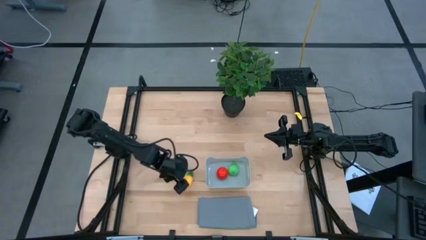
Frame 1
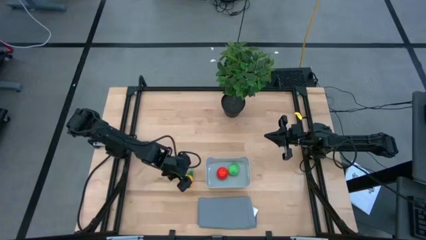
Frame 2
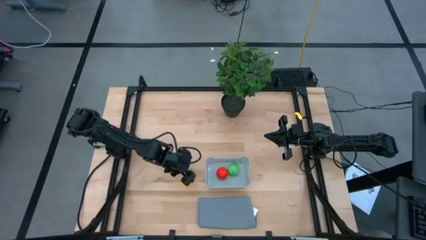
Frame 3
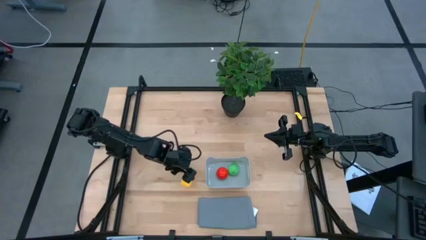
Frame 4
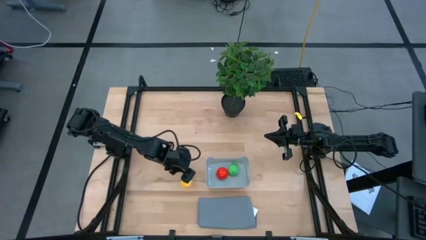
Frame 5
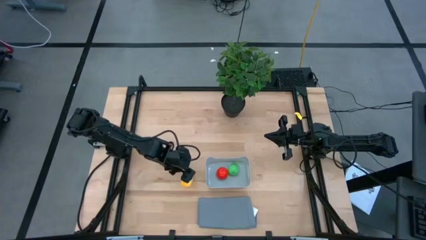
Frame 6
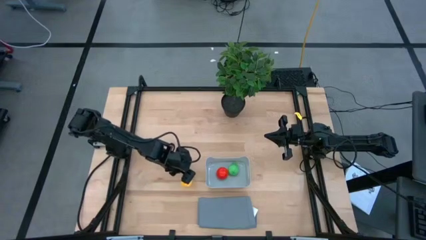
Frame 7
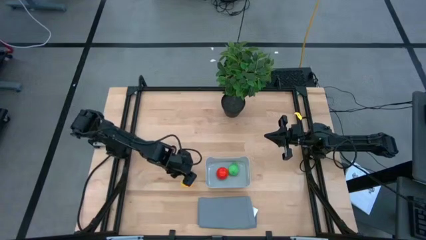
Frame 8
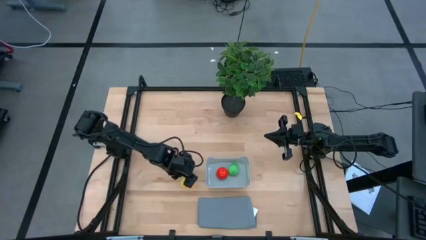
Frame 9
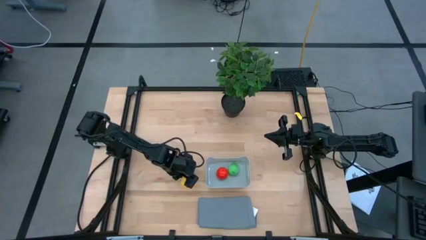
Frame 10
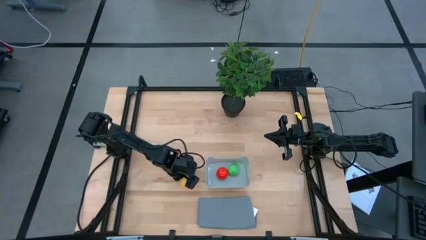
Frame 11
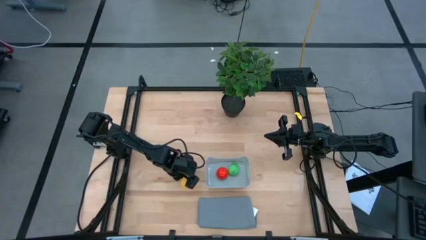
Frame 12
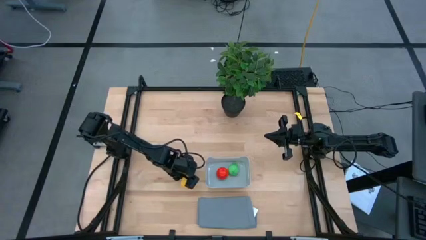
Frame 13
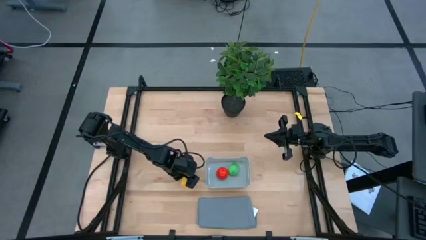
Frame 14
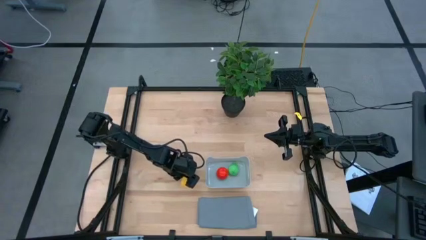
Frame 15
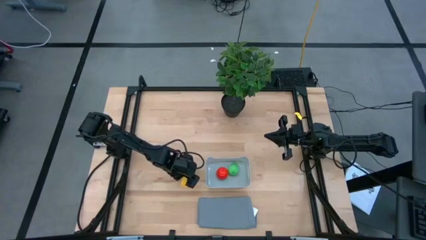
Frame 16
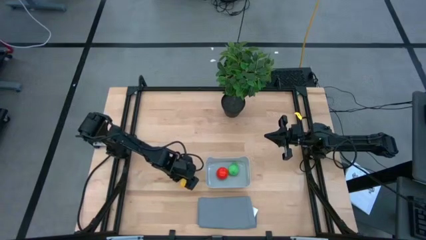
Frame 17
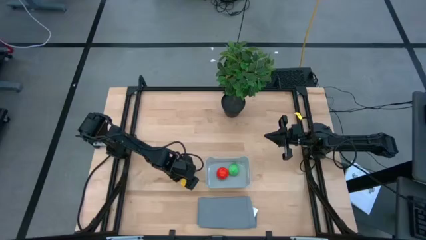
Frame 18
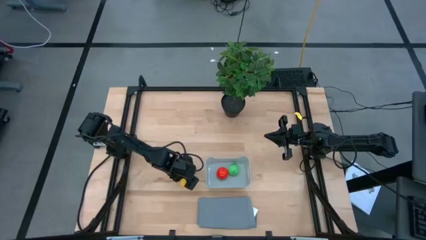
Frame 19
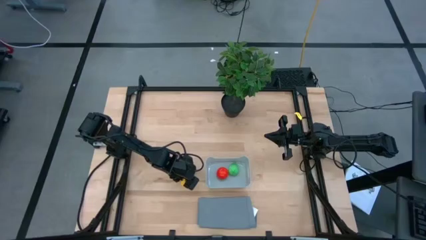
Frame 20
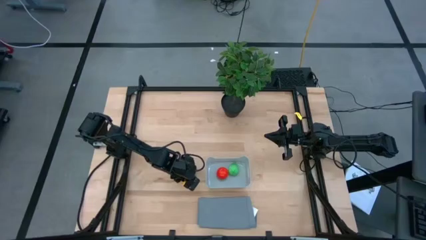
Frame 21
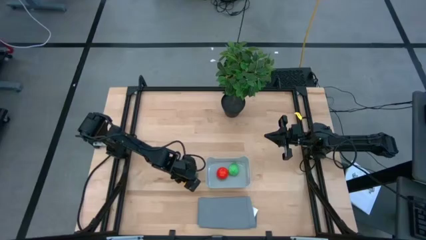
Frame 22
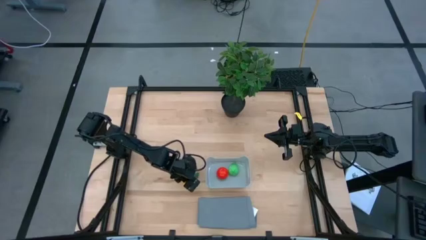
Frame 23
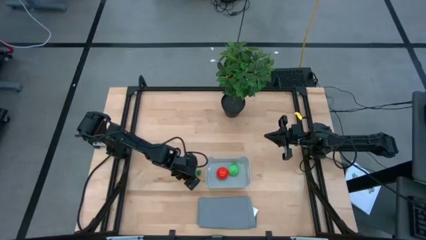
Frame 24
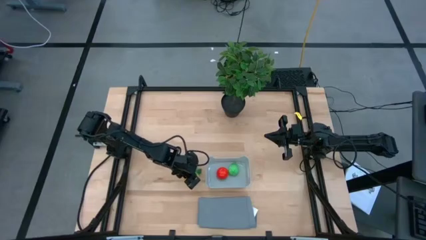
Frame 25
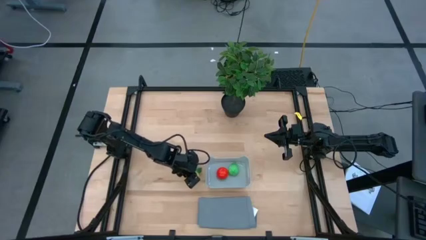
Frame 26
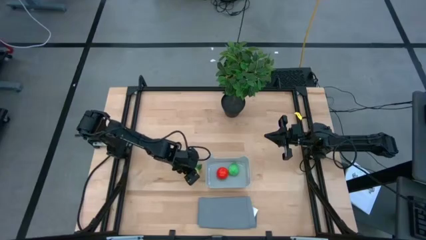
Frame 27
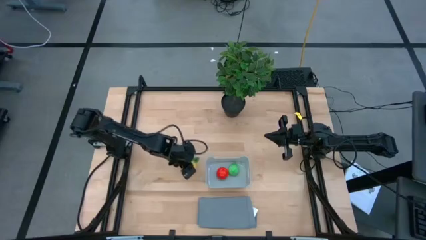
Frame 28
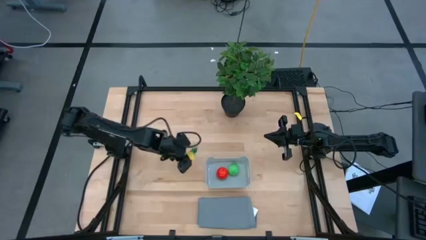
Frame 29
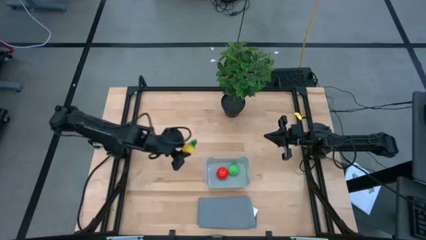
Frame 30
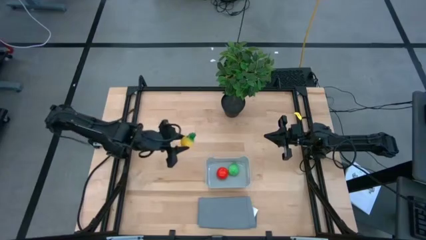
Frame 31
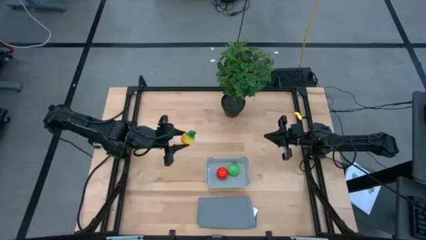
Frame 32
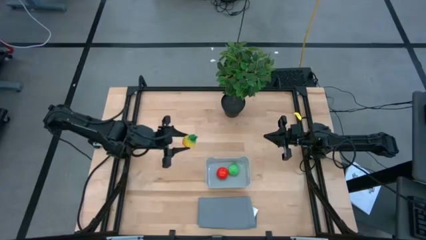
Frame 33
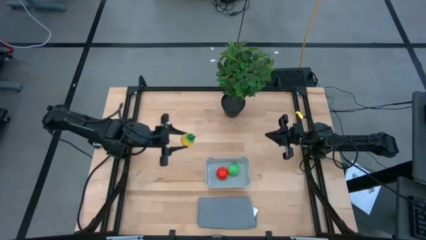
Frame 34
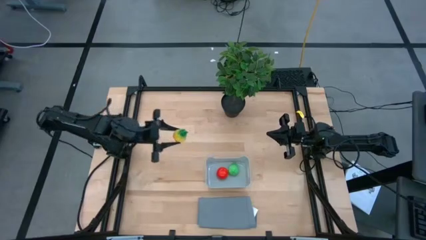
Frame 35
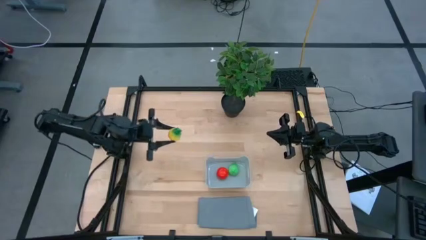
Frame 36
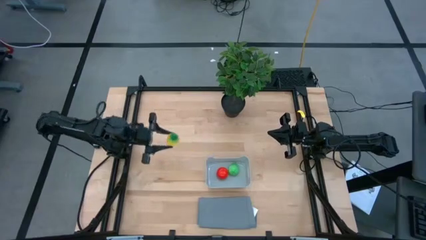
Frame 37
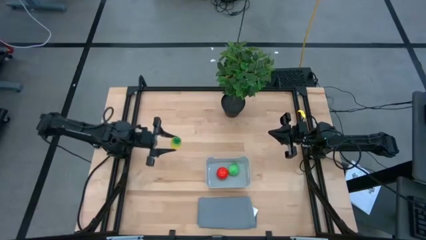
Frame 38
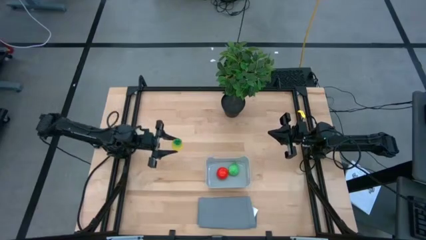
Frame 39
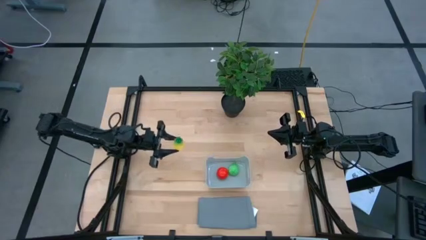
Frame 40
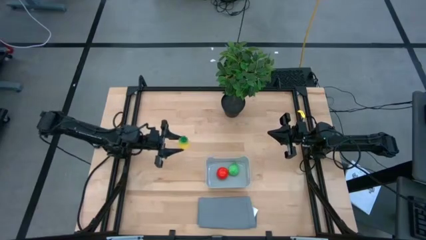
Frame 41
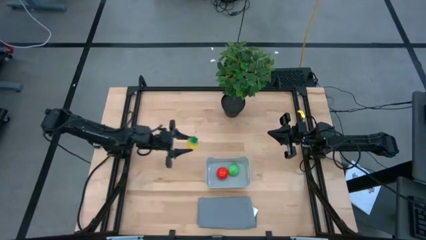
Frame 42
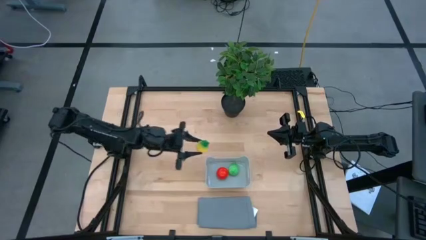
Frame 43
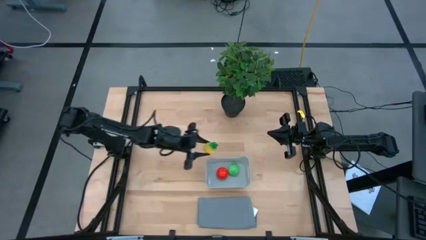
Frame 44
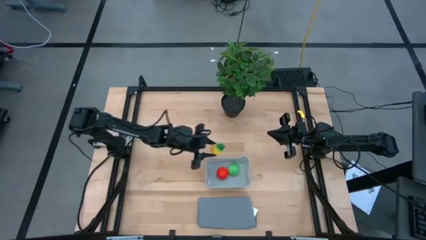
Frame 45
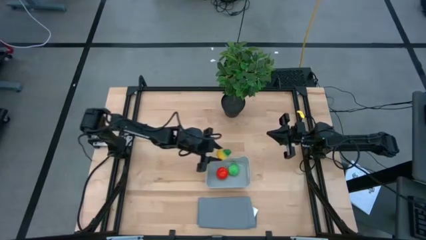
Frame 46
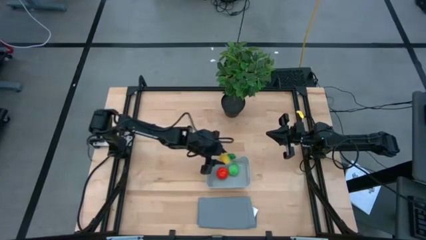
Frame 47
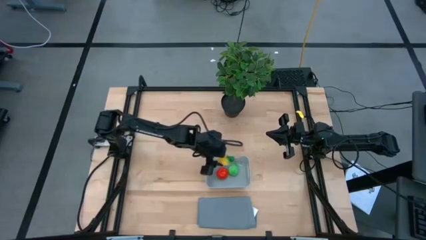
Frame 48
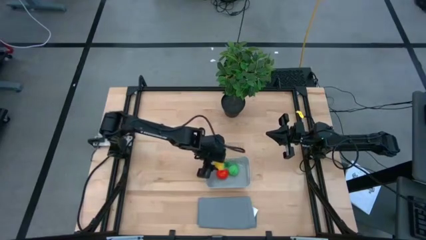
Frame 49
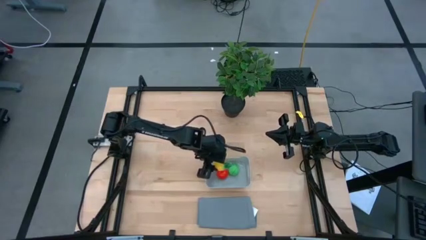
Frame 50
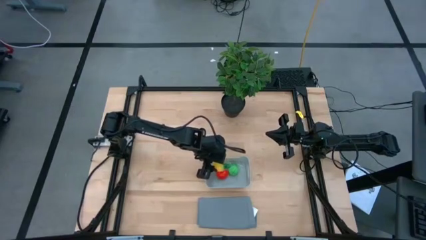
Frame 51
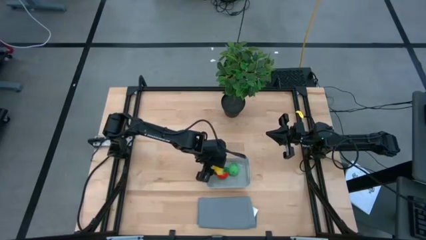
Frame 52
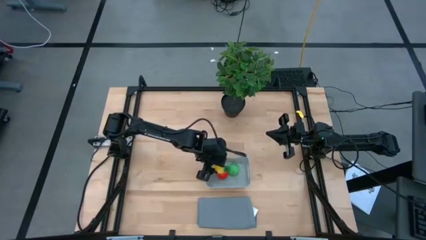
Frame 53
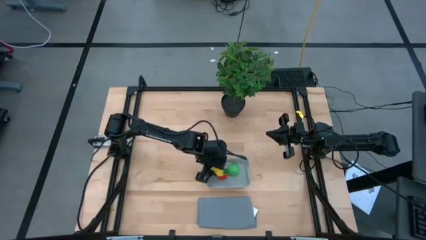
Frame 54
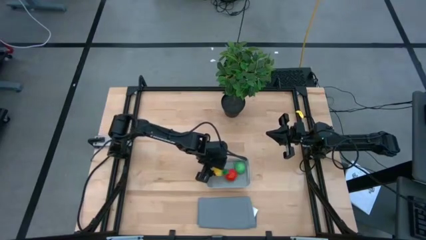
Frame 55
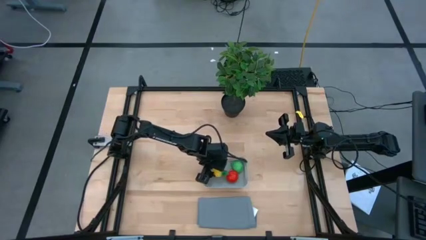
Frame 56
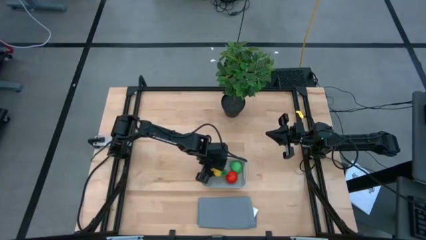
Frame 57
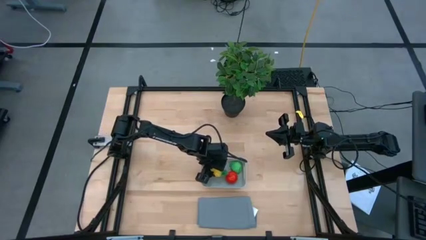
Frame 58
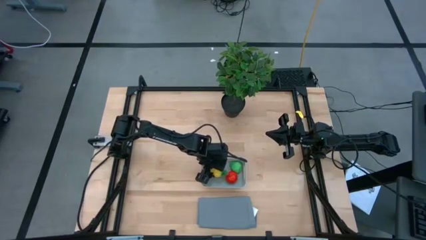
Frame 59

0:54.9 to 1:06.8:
Task: Pick and placing Produce into tupperware
Put the pineapple into the gray bin

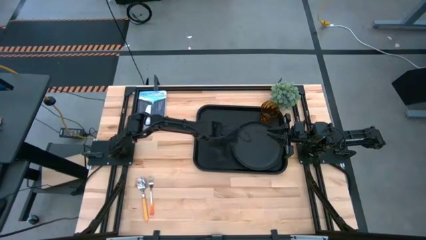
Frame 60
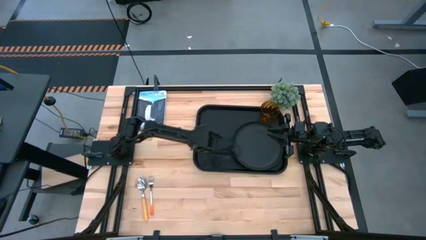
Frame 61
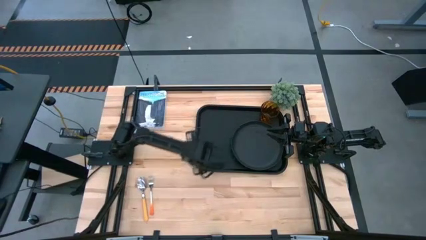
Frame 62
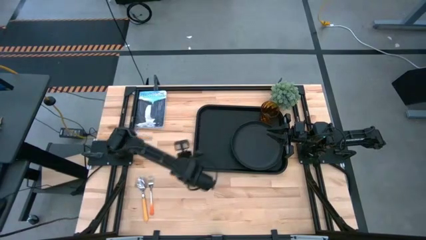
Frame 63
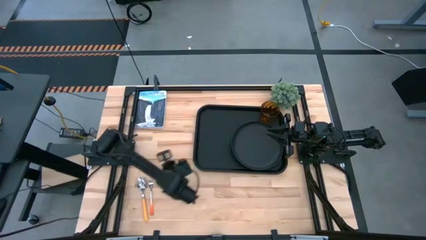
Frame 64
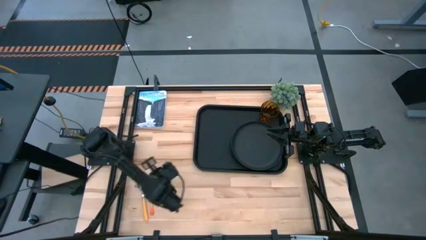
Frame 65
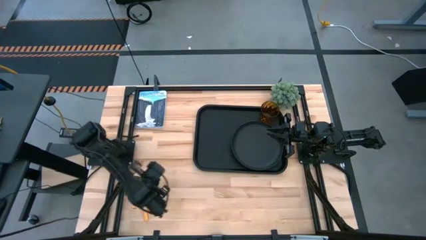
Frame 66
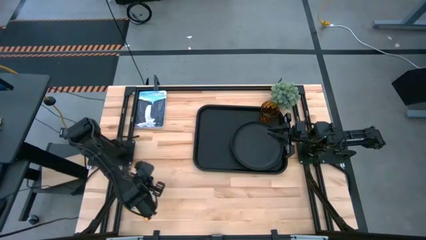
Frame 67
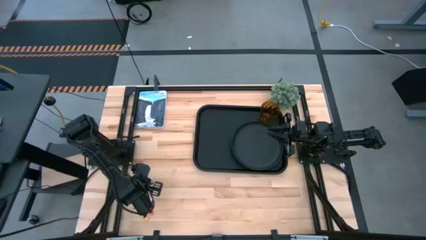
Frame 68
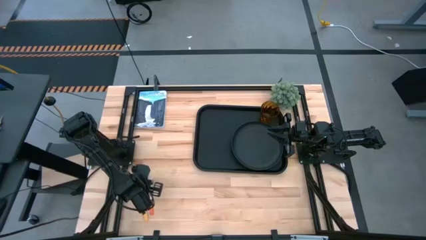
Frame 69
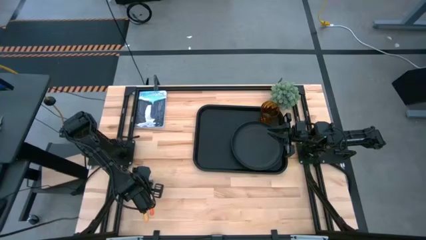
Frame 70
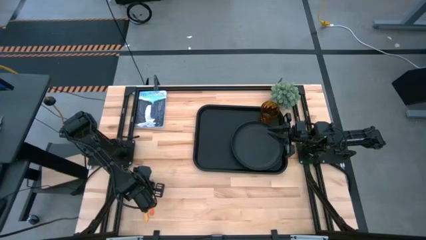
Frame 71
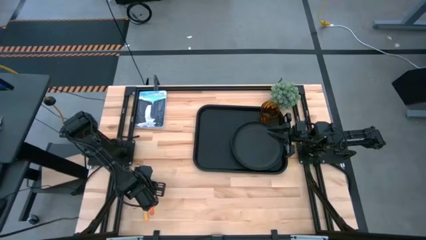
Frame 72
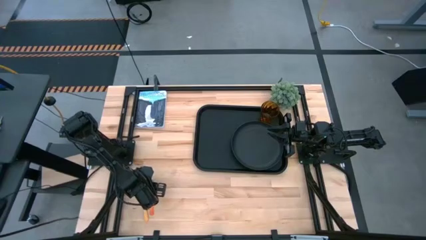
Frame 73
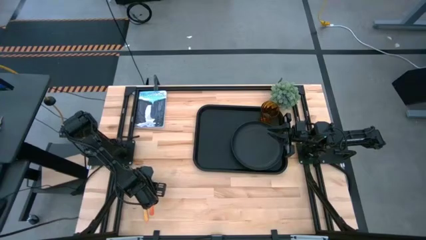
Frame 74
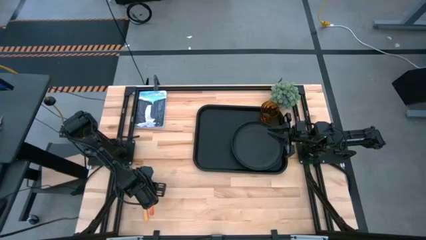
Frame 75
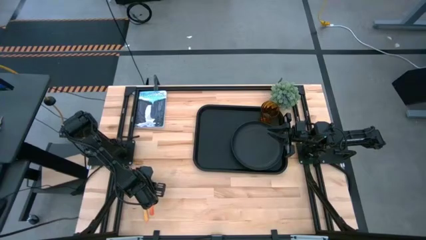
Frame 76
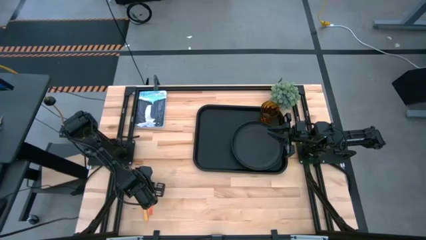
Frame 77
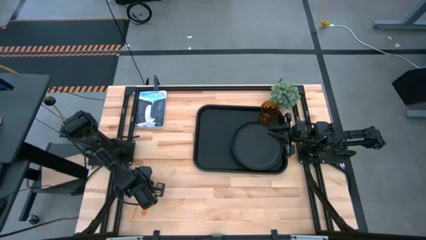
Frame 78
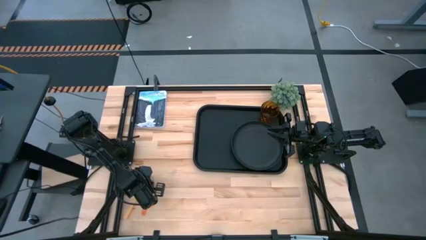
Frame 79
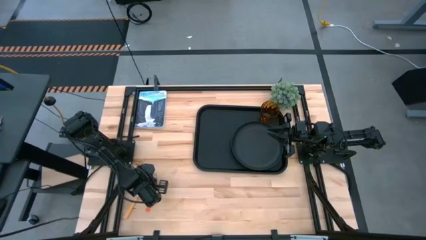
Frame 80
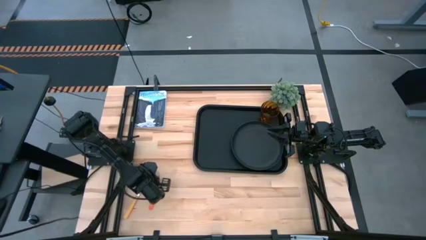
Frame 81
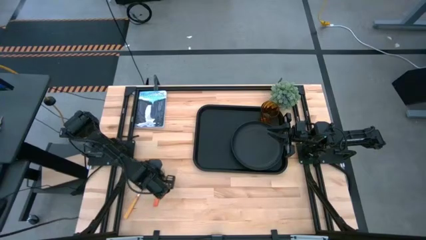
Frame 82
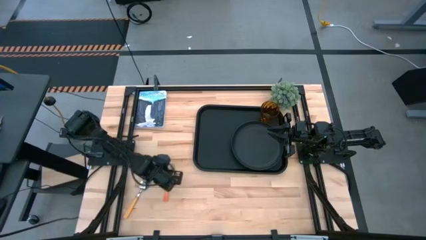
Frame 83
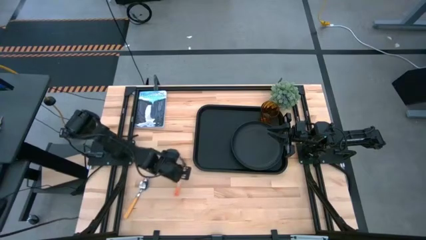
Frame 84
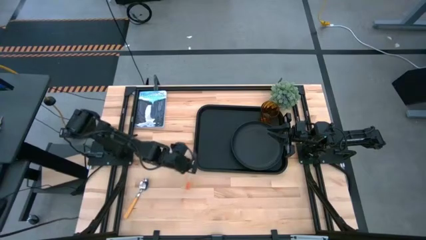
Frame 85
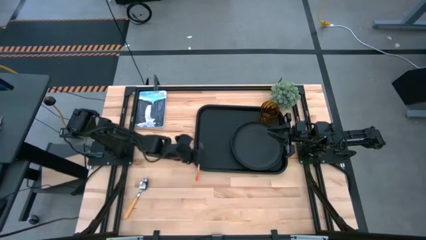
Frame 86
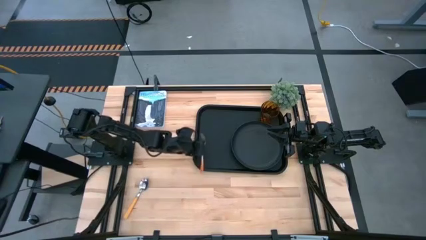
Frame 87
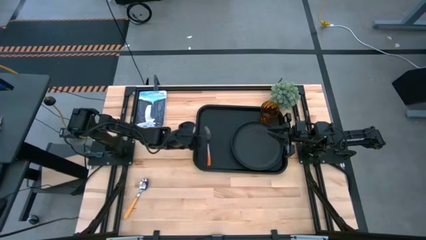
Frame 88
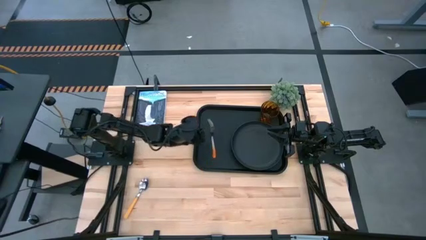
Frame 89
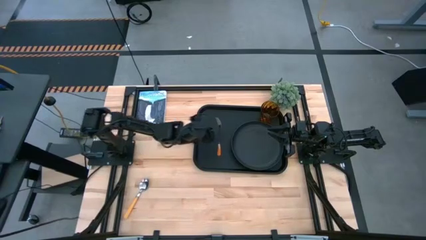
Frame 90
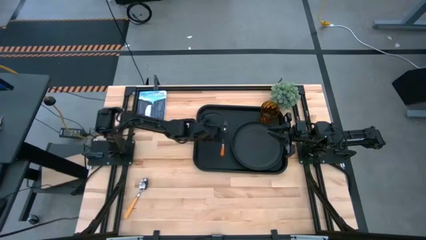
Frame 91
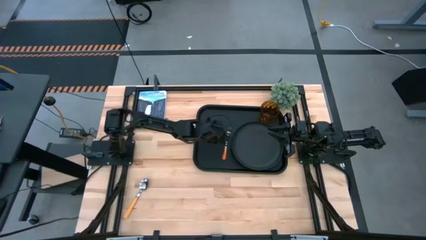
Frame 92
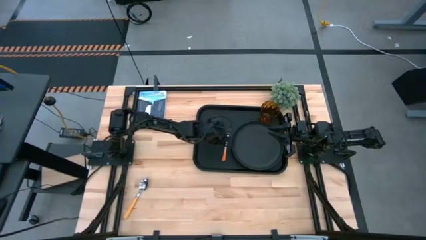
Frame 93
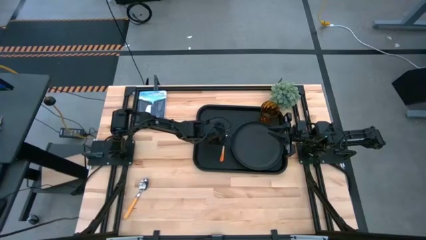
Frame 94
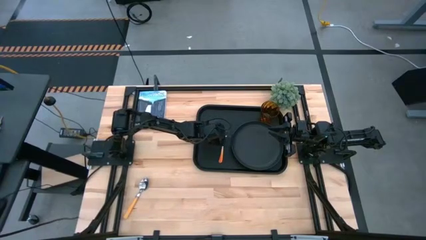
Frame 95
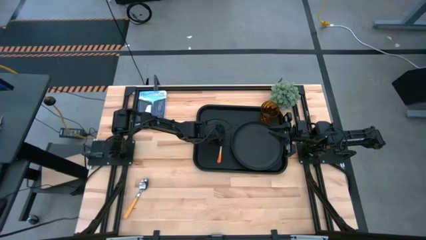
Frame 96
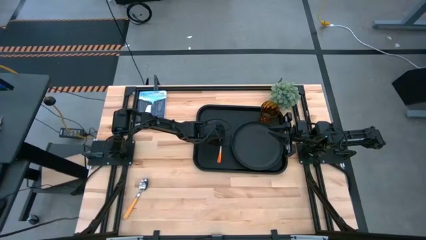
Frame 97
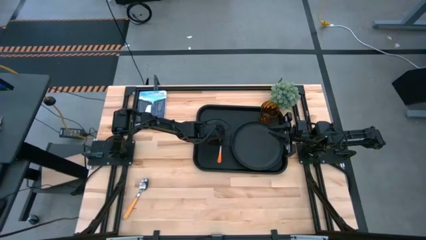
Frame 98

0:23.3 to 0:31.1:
Task: Pick and place plate/cup/fork/spoon on tray
Put the orange fork on the black tray to the left of the black plate
